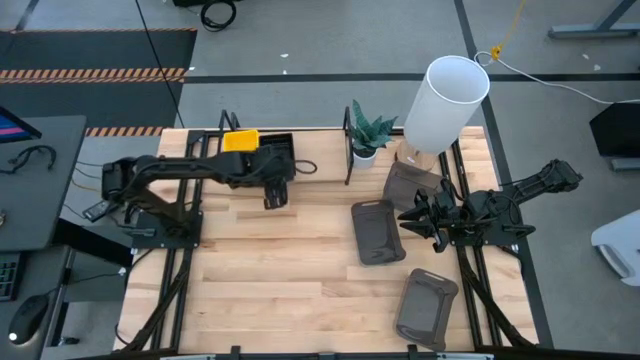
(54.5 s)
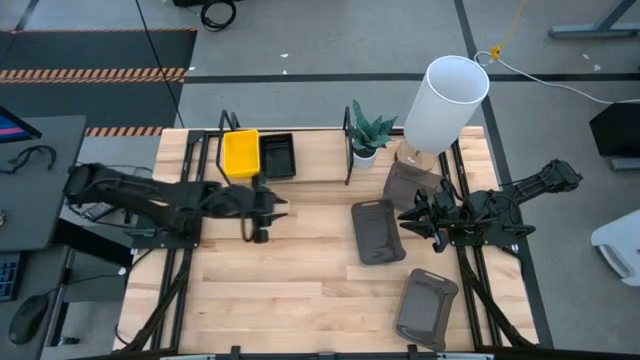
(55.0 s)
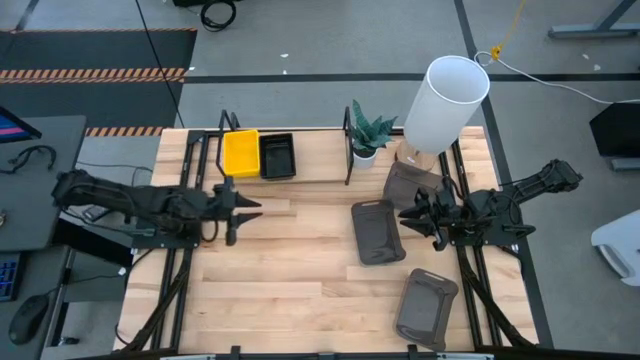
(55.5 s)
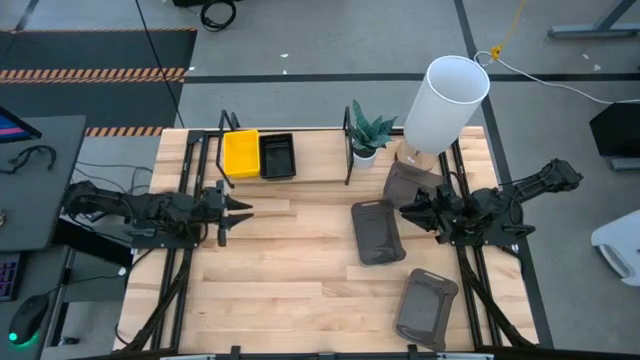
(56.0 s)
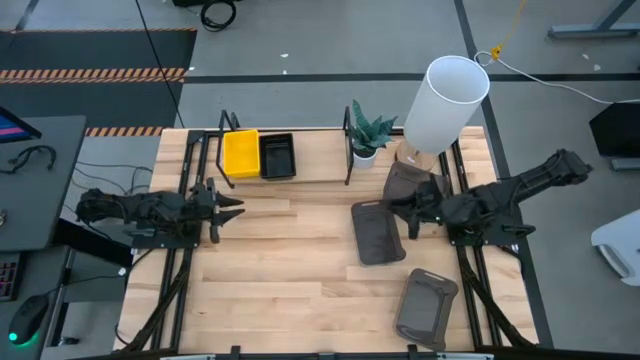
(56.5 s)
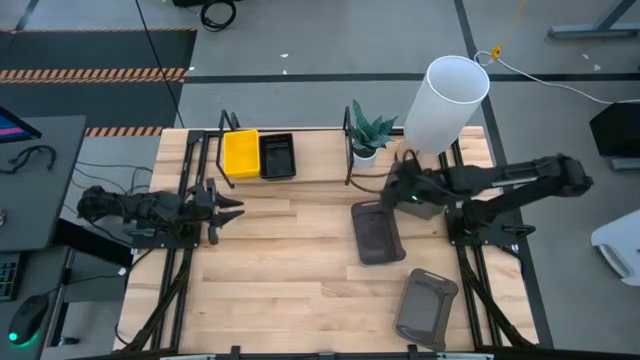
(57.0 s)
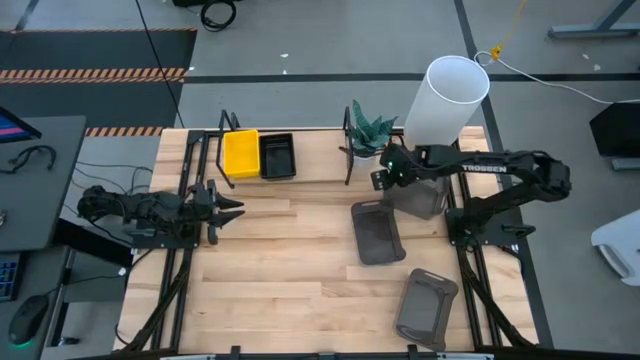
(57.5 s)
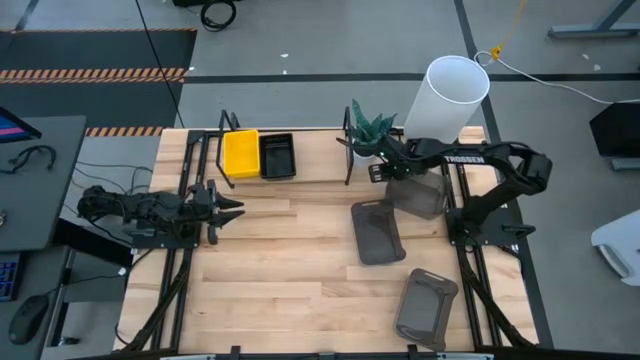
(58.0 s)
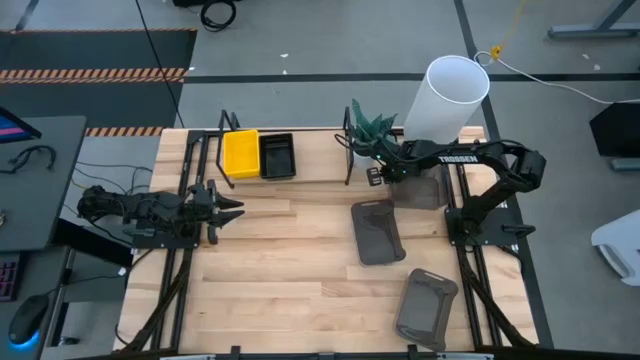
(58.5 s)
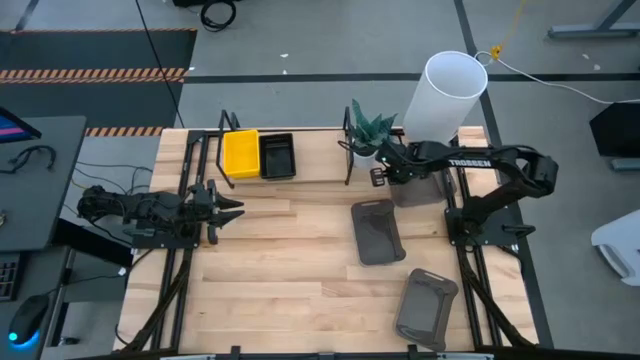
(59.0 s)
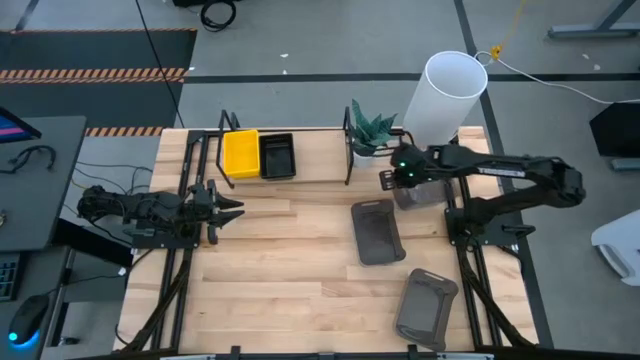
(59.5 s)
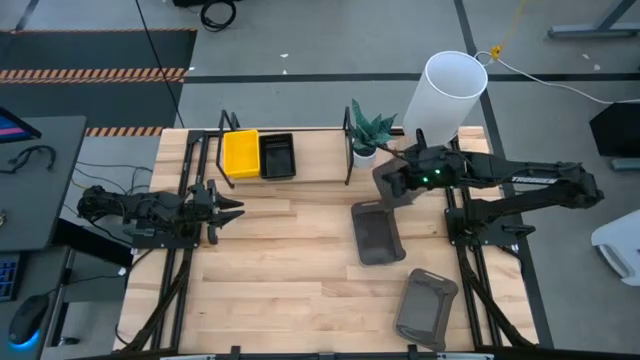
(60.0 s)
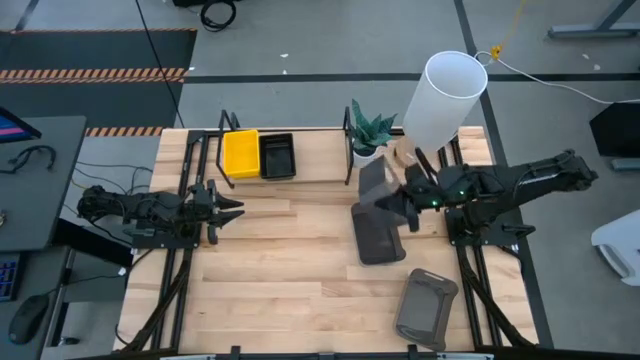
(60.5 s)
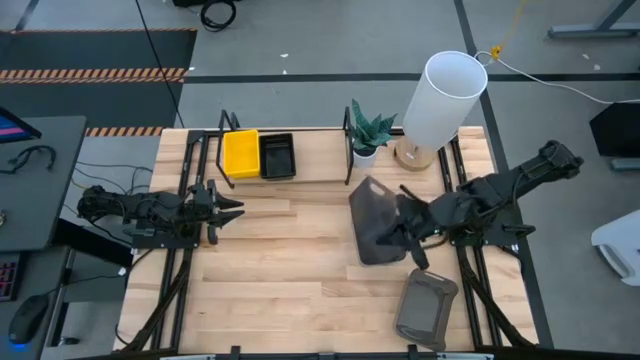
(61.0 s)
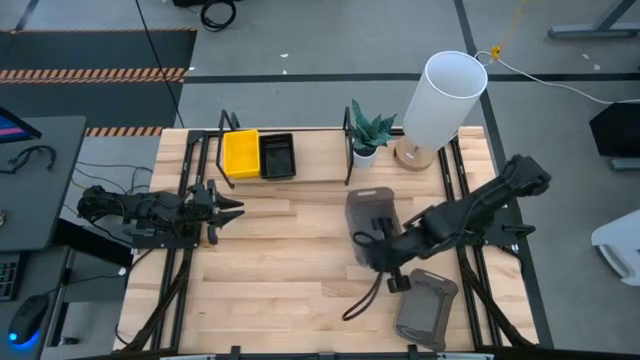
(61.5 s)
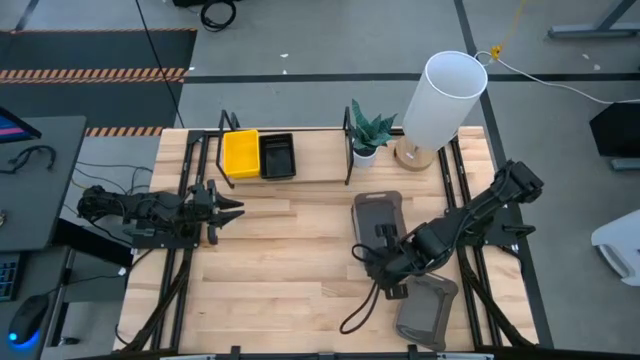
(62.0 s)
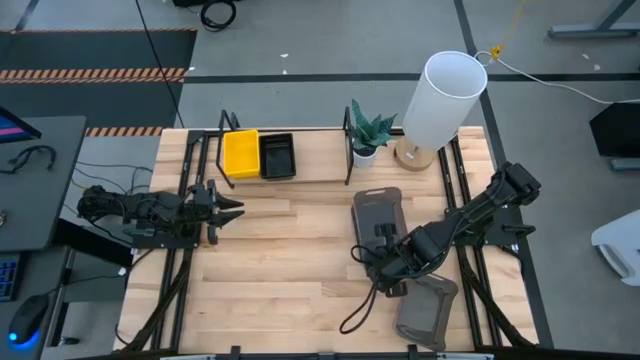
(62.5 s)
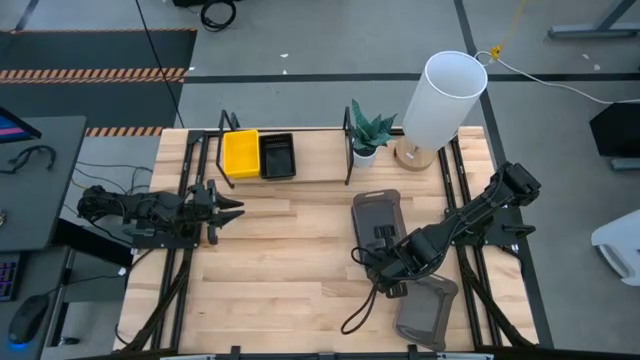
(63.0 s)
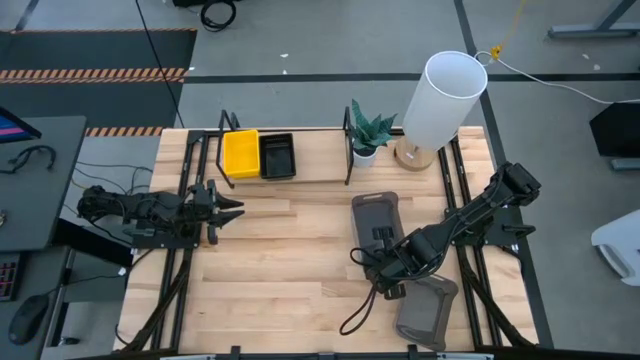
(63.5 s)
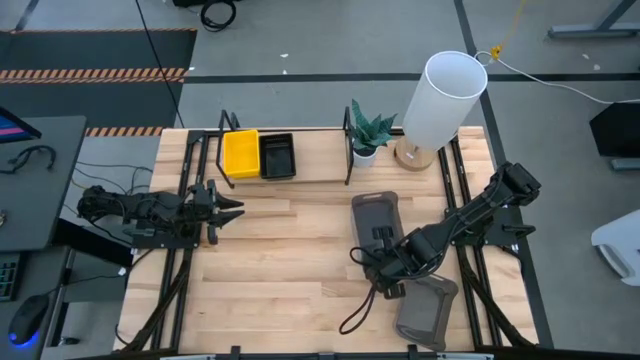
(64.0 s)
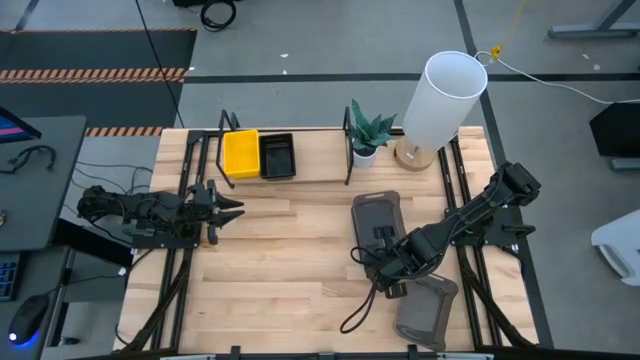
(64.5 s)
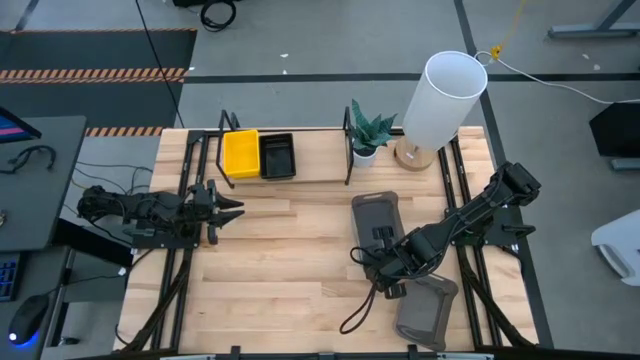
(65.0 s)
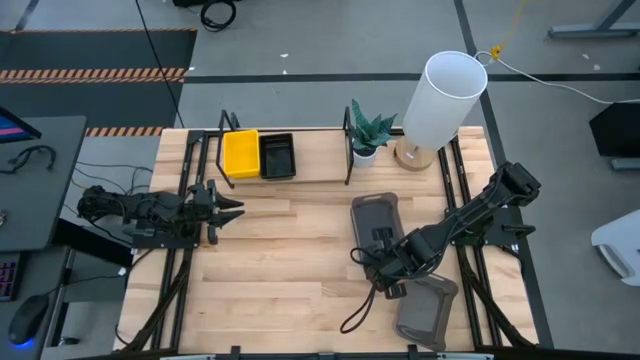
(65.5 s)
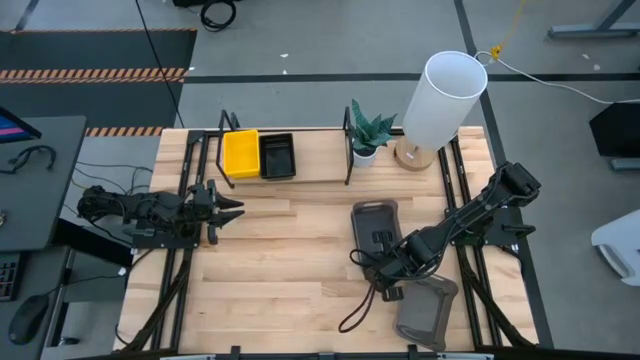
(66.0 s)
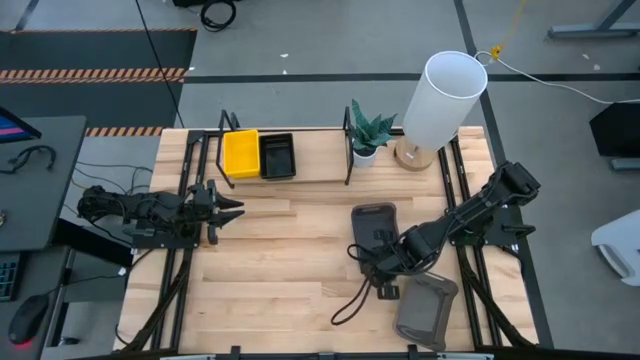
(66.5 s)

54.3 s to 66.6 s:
Task: Stack baskets on shelf by color
Stack the top right black transparent bin on the middle black transparent bin

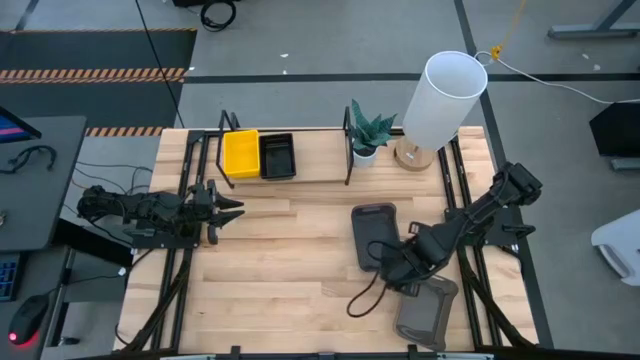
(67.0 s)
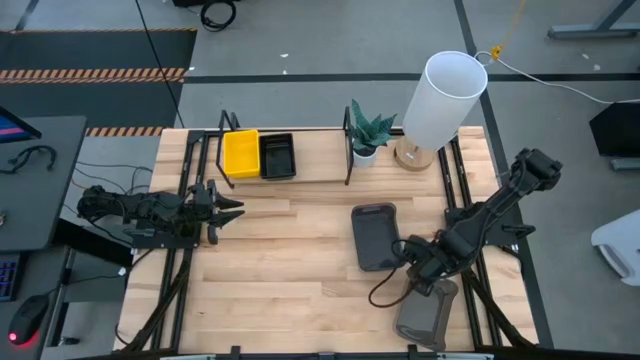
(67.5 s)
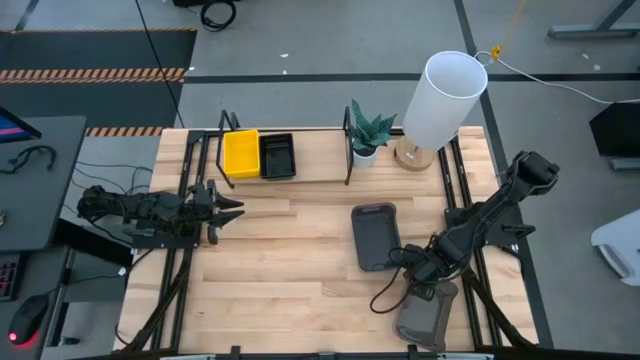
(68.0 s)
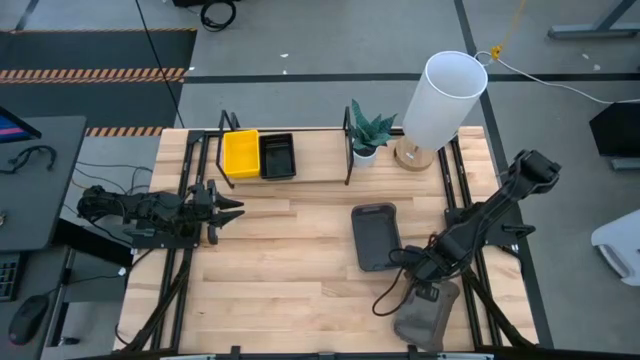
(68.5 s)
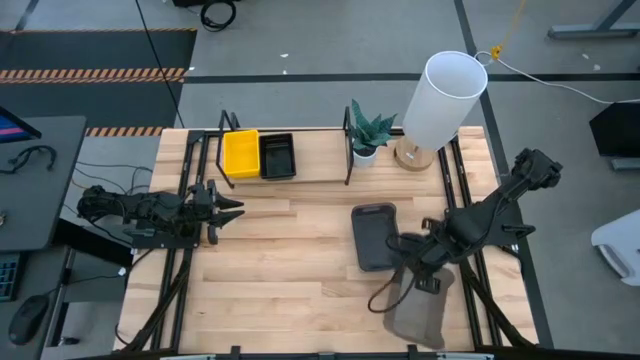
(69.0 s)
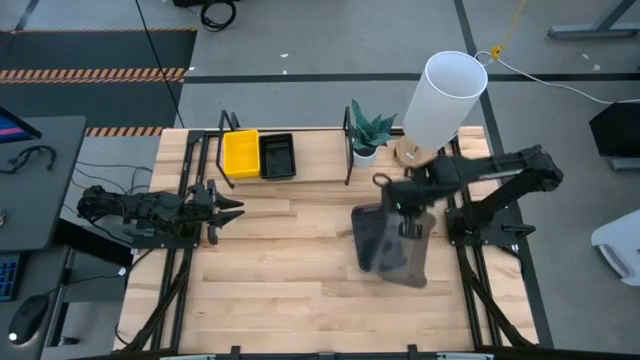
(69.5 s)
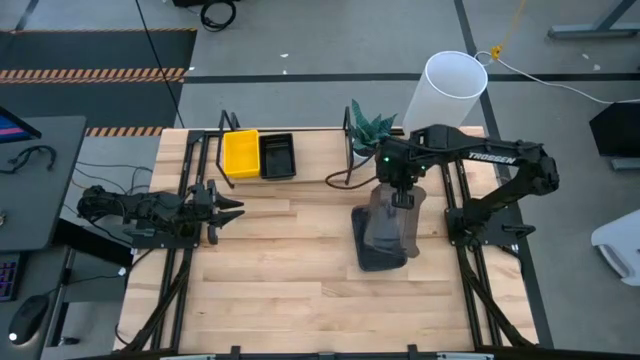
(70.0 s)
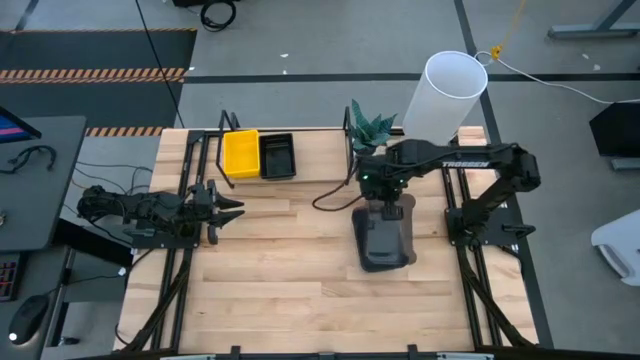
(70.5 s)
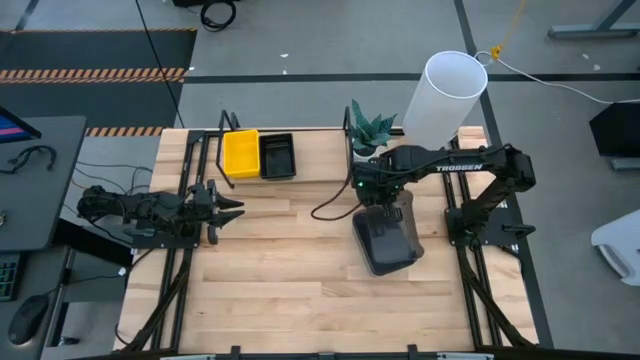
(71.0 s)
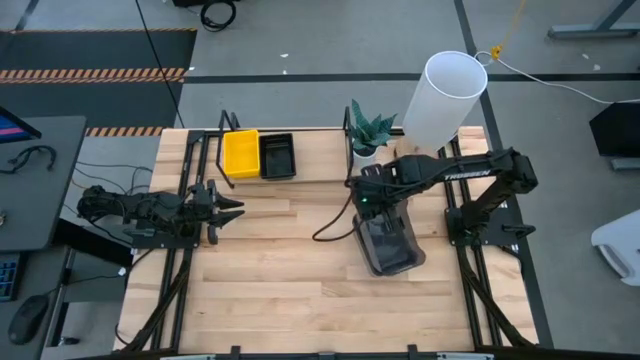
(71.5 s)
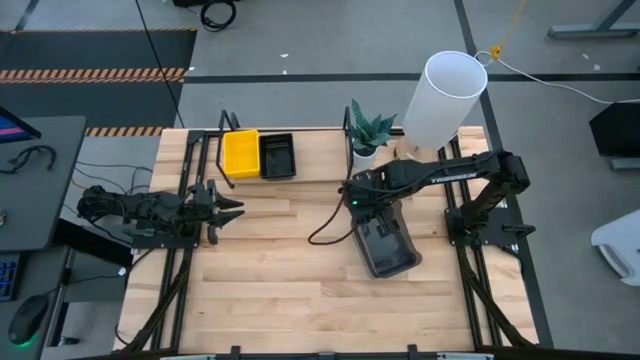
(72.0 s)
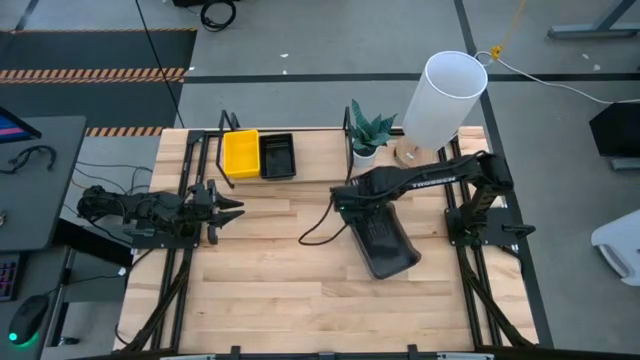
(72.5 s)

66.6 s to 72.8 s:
Stack the bottom black transparent bin on the top black transparent bin
